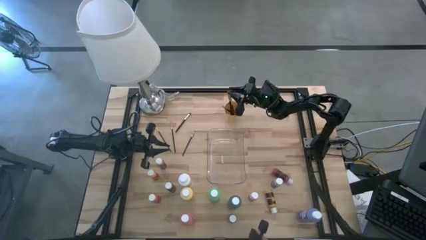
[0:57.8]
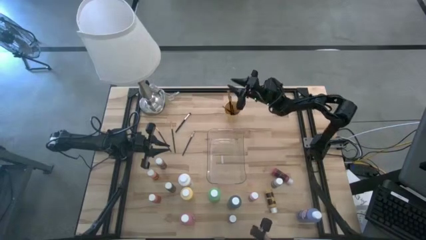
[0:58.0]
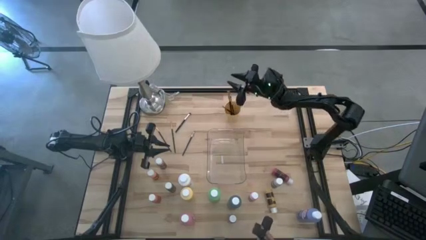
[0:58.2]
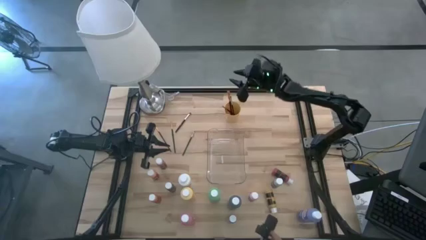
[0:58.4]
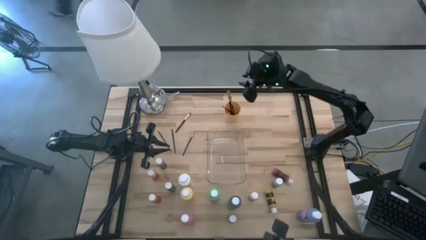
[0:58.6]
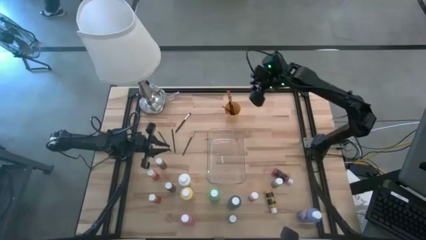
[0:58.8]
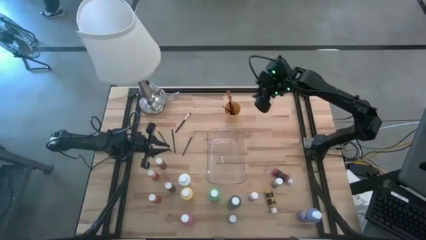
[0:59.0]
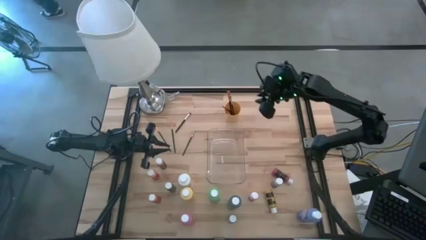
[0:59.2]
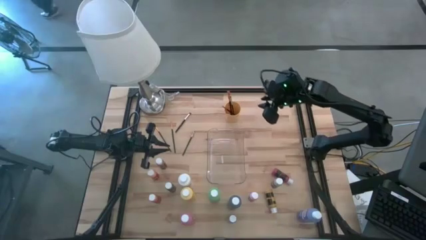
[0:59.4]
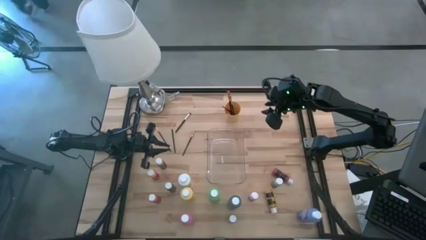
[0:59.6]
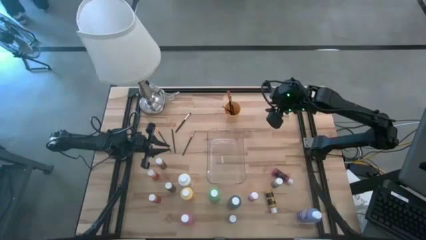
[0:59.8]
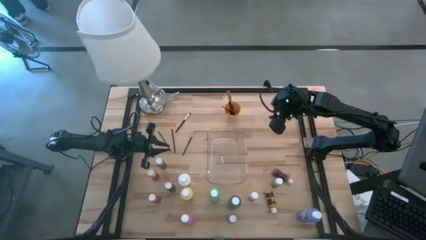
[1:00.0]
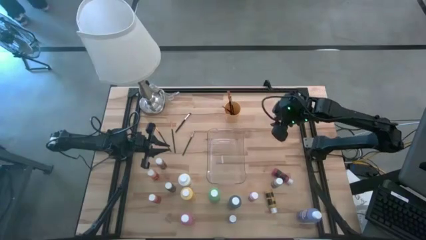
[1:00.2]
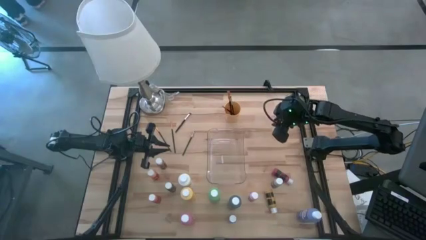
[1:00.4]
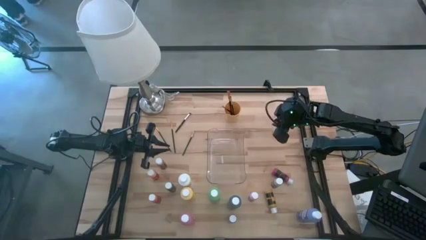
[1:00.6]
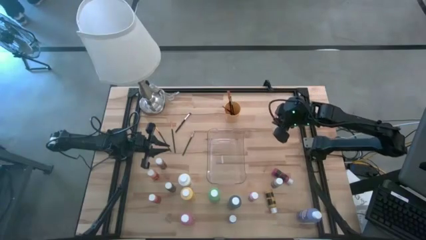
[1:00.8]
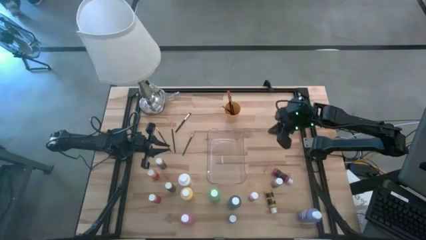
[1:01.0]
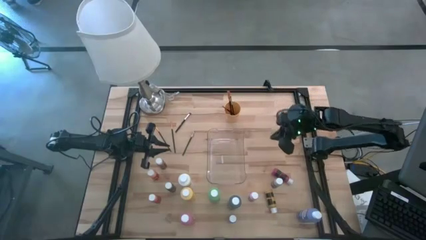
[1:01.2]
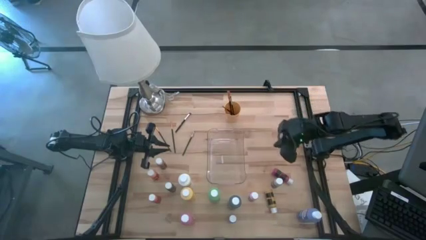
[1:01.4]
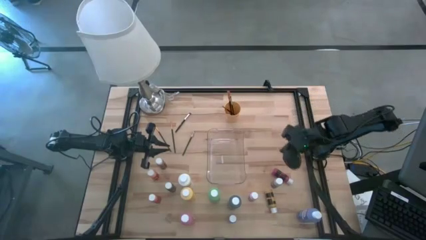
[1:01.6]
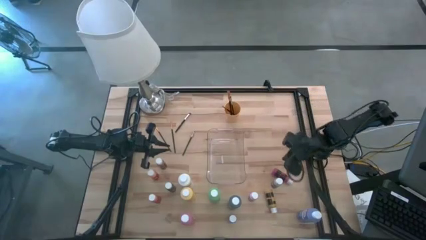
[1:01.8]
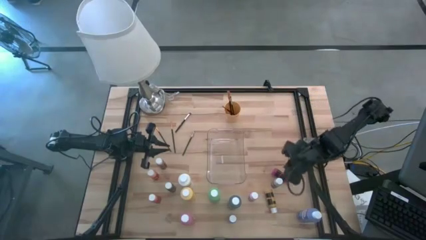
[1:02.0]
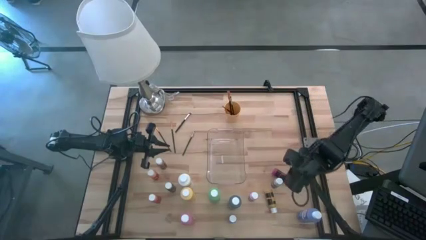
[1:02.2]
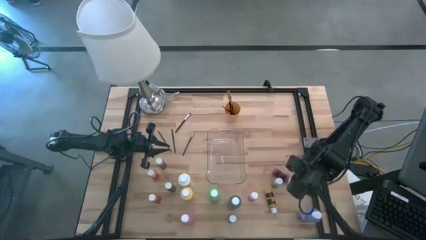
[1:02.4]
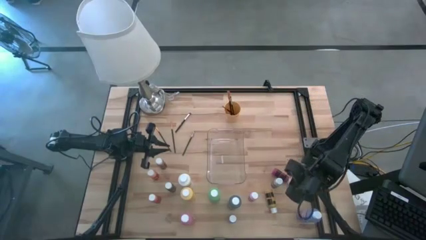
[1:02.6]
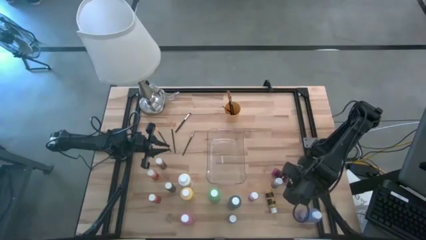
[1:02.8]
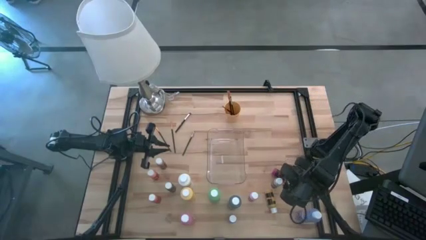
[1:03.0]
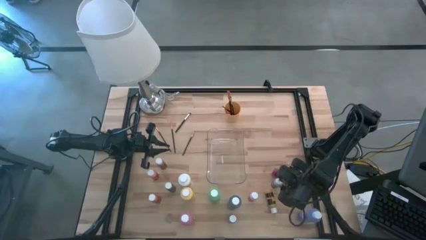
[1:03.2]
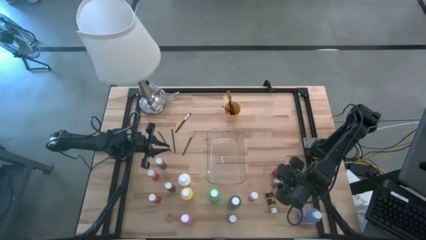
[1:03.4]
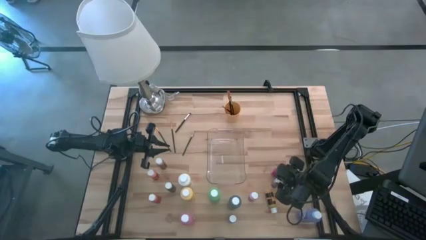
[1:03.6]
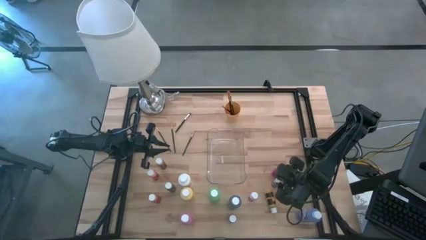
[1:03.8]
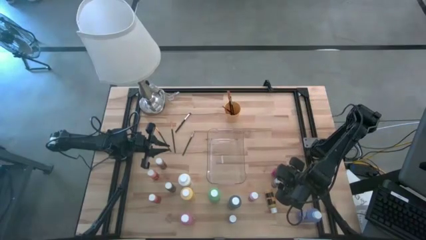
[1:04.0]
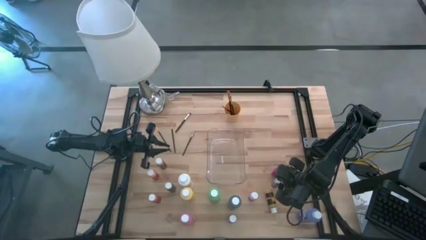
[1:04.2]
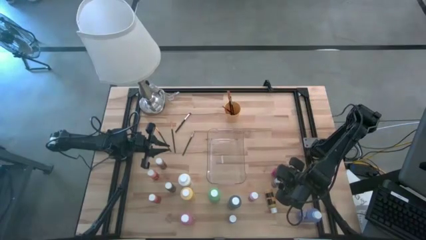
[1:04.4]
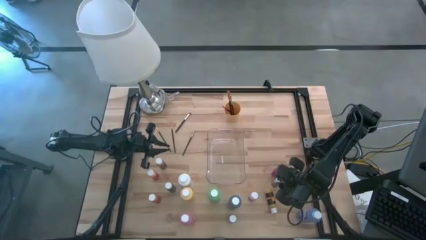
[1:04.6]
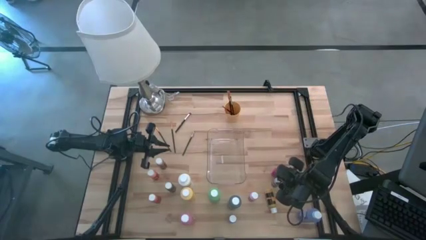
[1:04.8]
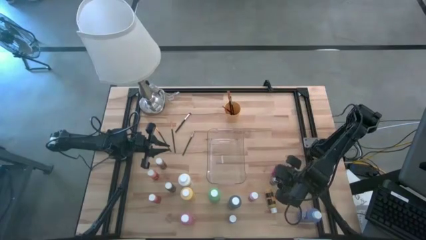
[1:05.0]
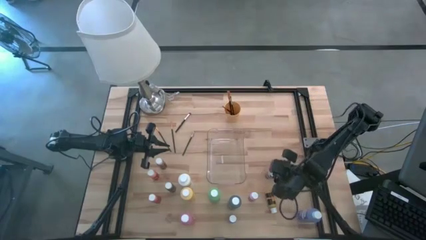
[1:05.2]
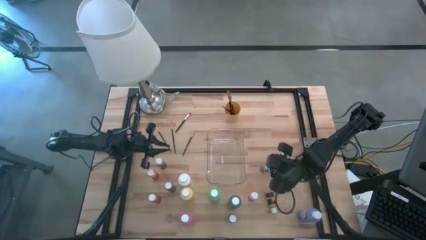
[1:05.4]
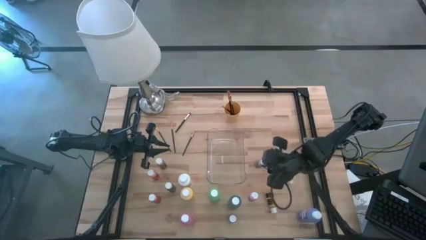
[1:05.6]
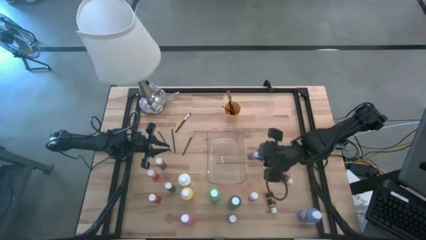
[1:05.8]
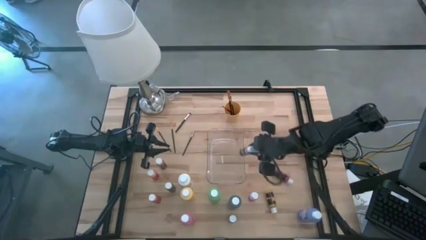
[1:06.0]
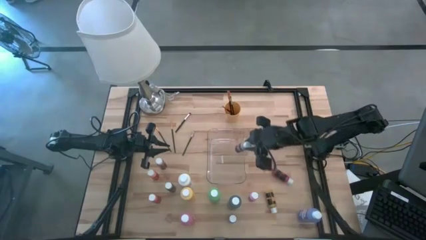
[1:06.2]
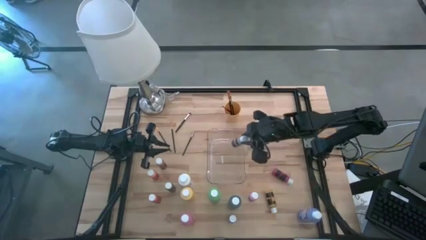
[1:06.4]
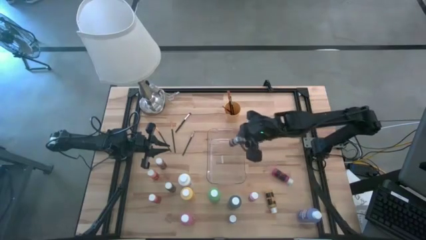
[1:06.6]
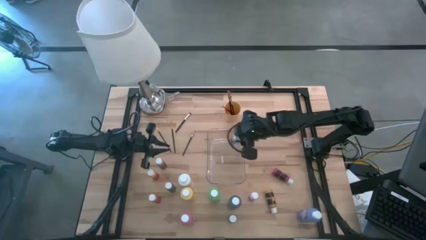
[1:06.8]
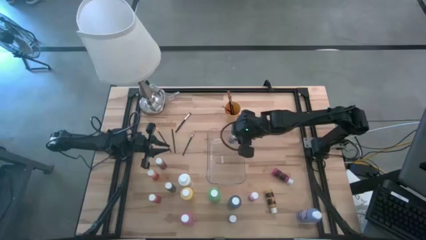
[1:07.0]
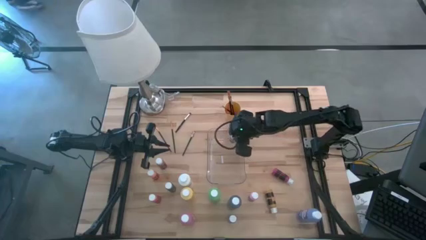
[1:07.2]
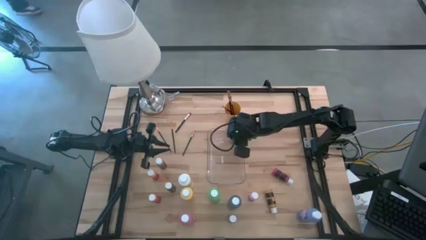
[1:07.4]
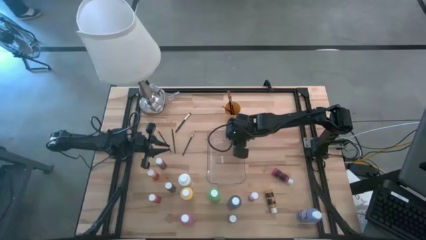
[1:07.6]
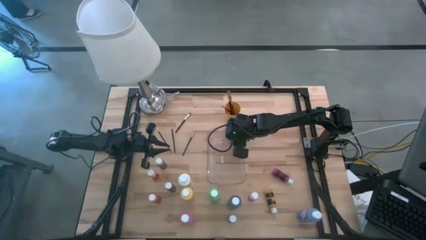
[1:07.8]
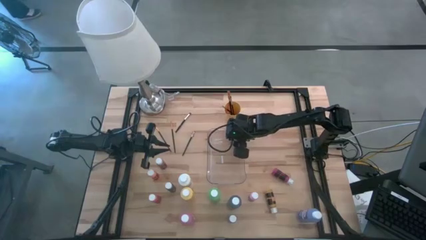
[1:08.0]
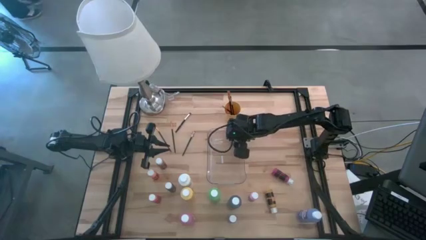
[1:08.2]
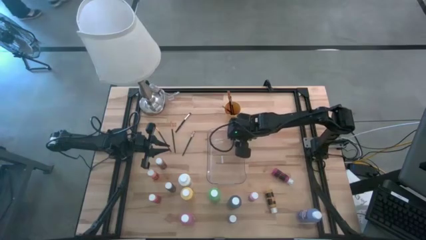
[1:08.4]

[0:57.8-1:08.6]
Task: Pick & Place Paint Supplies
Put the small gray paint bottle into the transparent bin

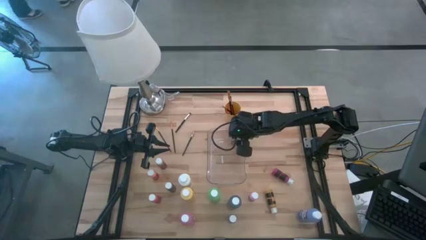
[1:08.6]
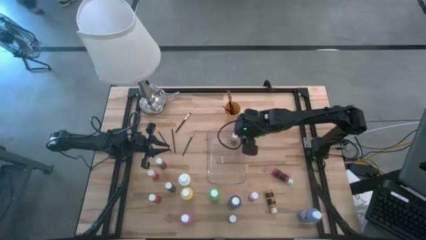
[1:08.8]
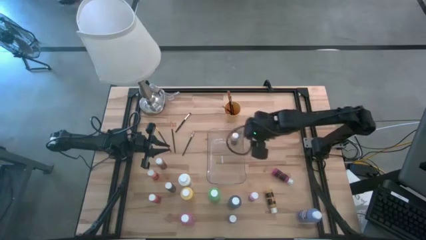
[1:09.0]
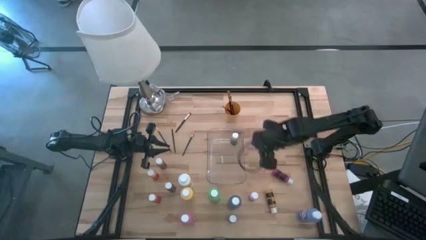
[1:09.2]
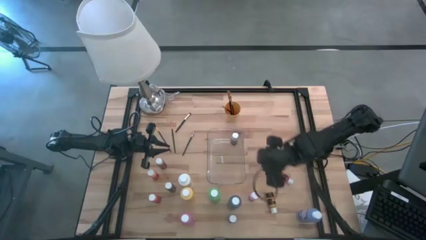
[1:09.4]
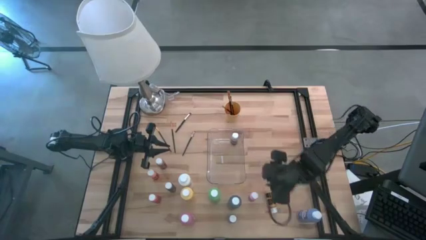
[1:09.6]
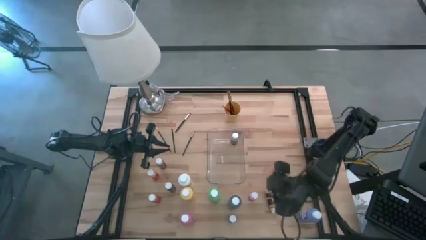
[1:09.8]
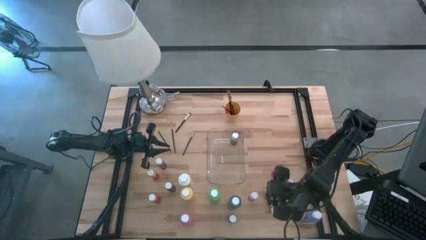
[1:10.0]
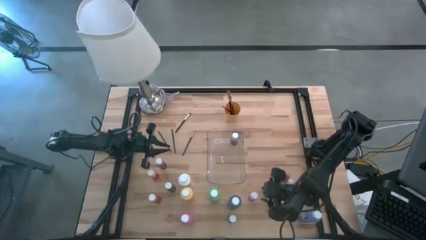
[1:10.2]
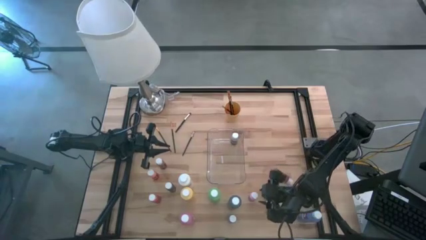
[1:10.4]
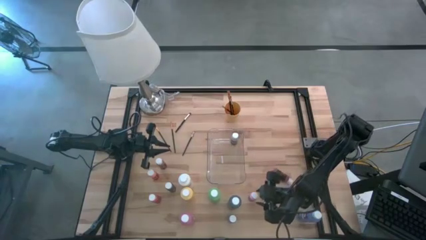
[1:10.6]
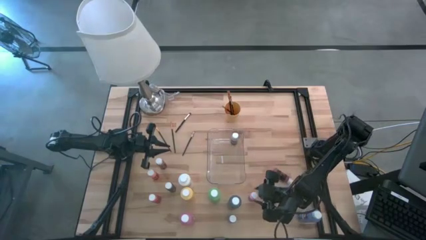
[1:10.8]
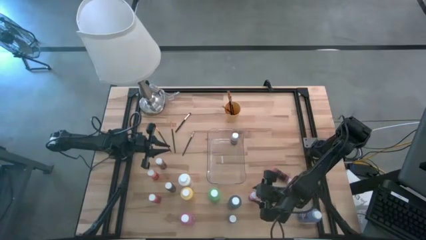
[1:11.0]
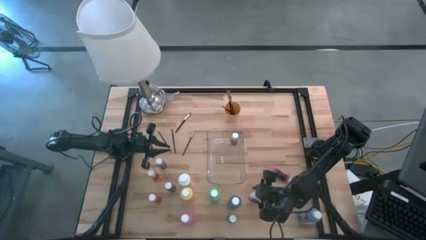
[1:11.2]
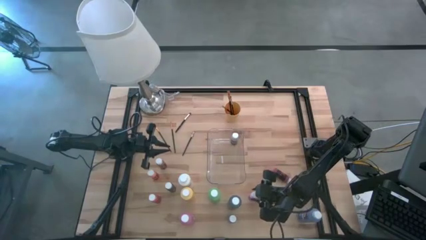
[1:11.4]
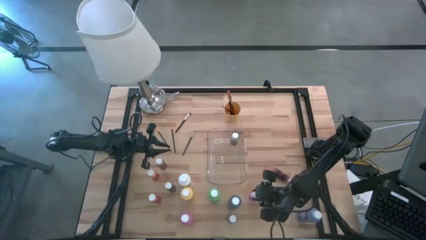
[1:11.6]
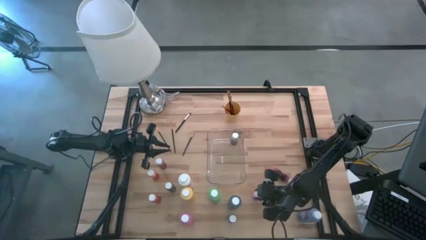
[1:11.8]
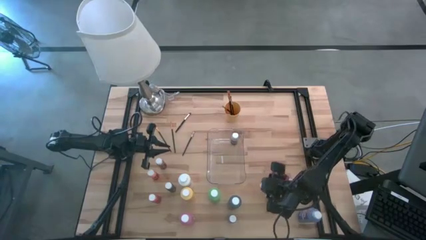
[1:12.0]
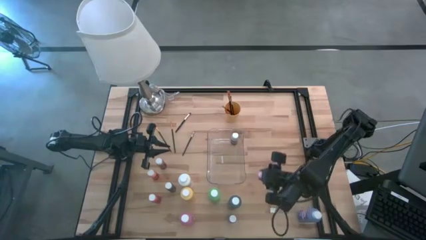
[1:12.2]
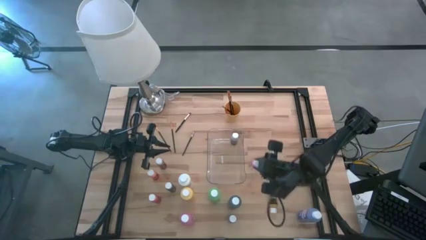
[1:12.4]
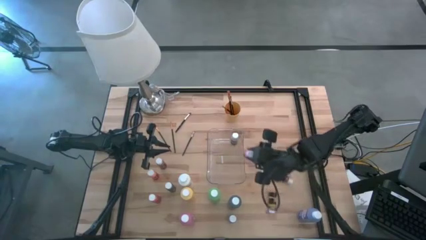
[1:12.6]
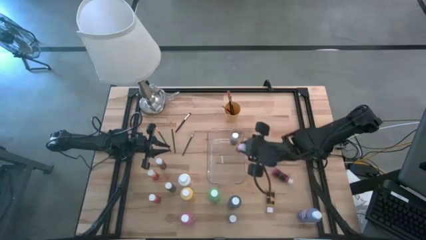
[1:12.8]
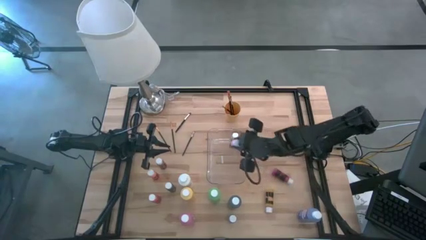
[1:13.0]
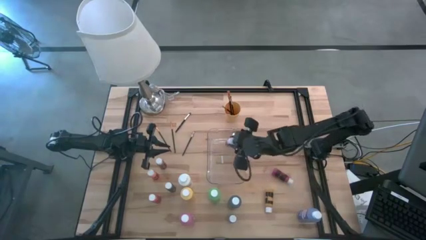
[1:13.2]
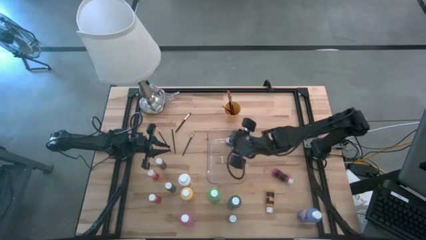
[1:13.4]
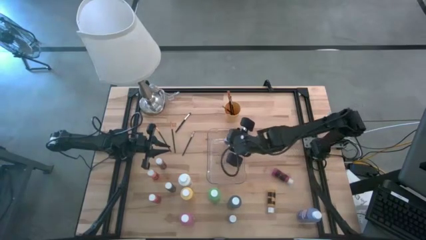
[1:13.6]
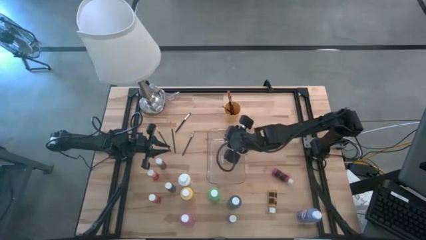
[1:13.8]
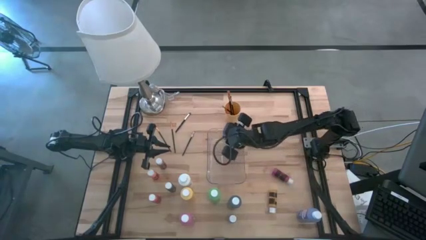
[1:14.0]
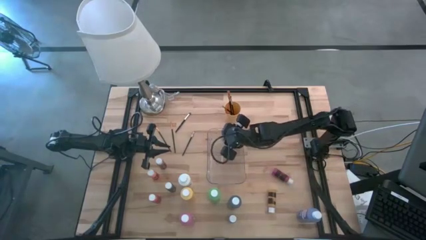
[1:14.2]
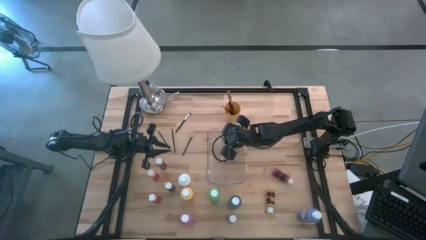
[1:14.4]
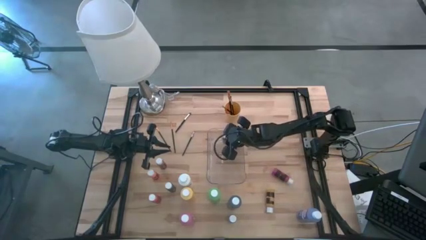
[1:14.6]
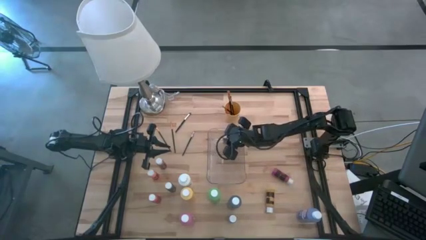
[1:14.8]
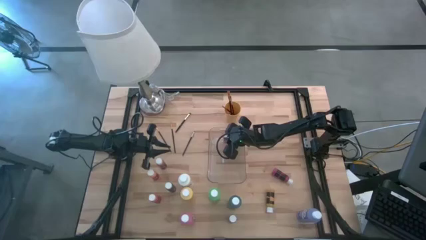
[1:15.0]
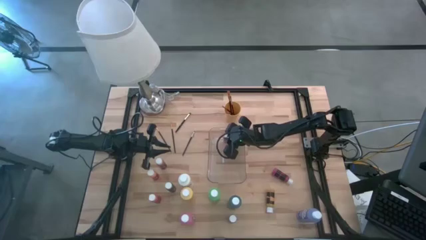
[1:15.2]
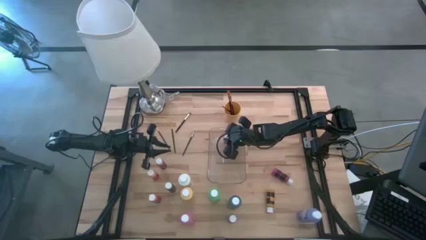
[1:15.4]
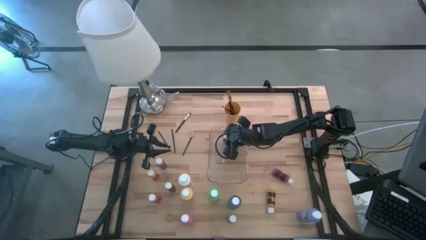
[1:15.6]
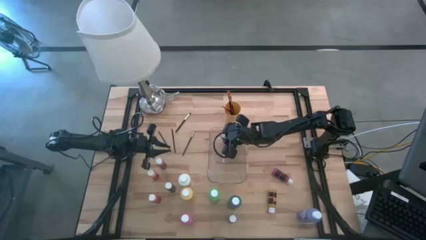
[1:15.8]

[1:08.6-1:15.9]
Put the small pink paint bottle into the transparent bin
